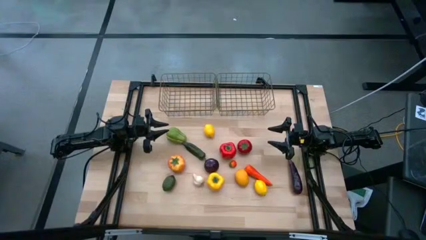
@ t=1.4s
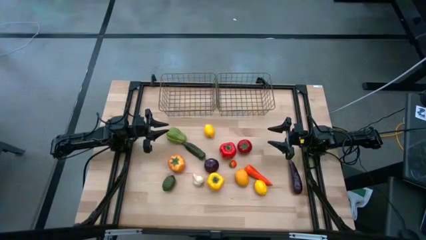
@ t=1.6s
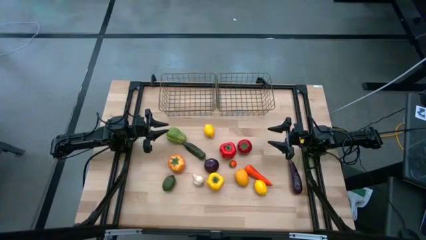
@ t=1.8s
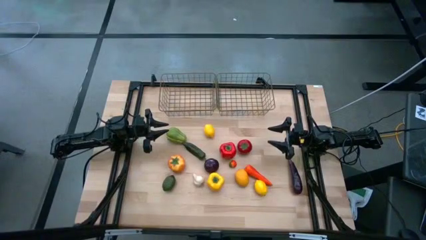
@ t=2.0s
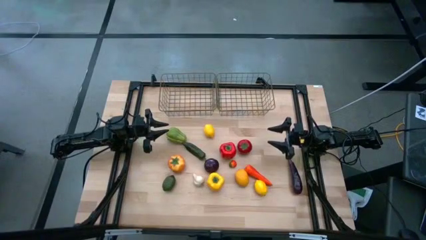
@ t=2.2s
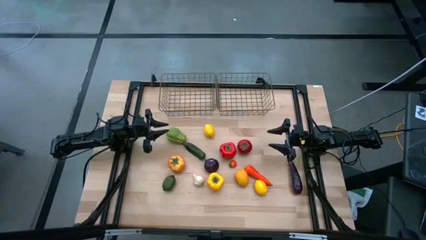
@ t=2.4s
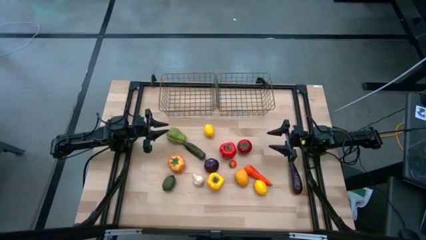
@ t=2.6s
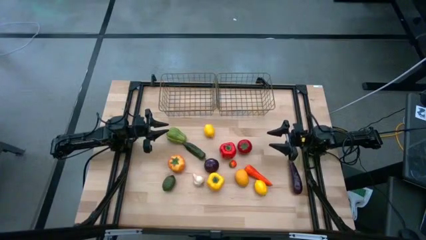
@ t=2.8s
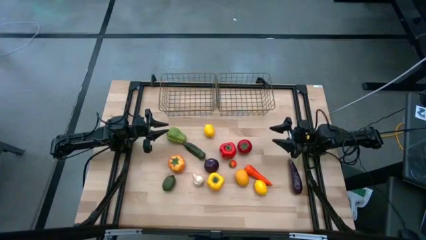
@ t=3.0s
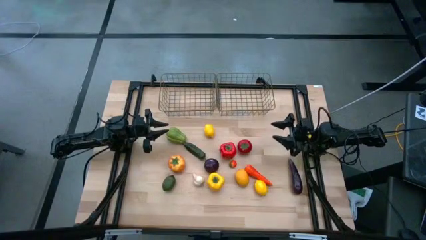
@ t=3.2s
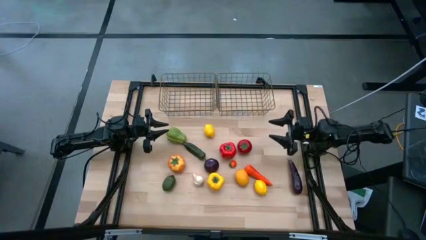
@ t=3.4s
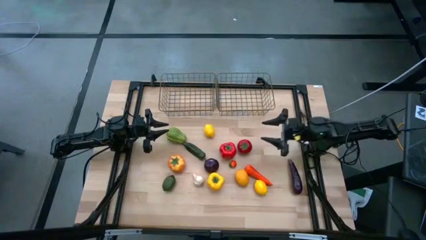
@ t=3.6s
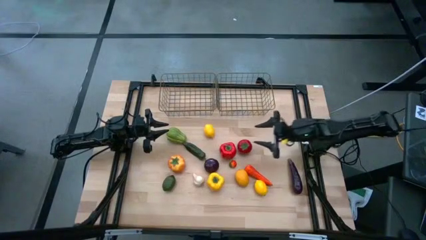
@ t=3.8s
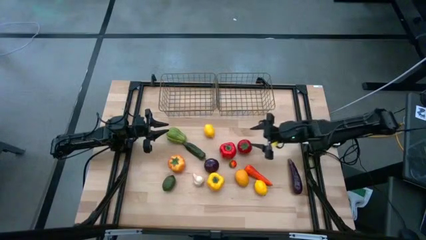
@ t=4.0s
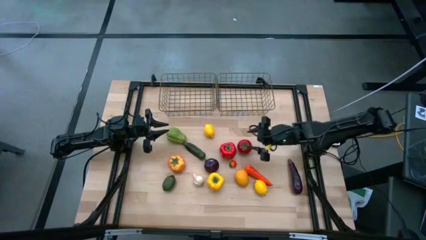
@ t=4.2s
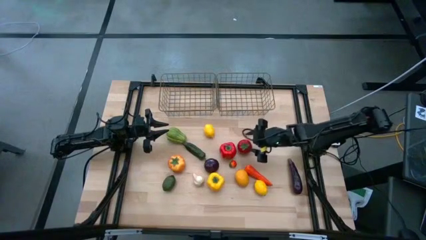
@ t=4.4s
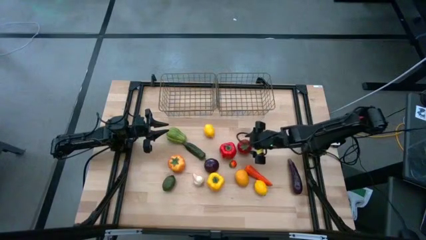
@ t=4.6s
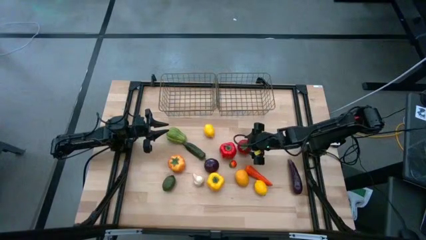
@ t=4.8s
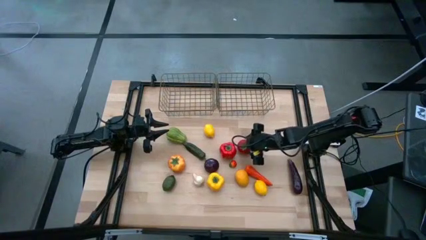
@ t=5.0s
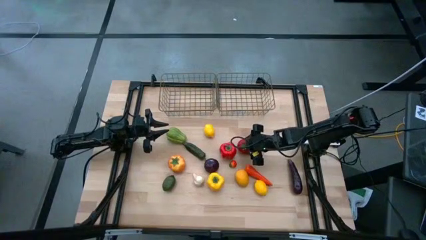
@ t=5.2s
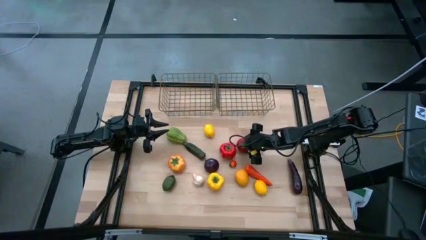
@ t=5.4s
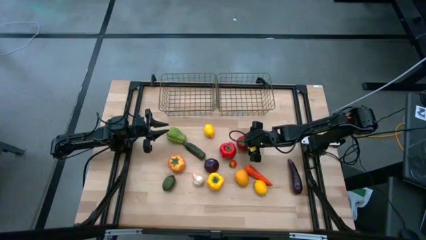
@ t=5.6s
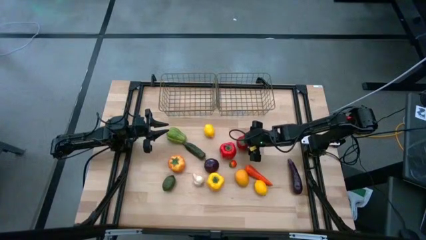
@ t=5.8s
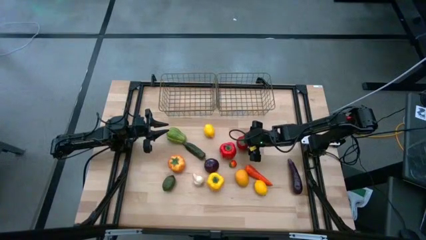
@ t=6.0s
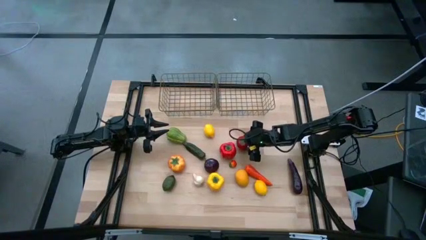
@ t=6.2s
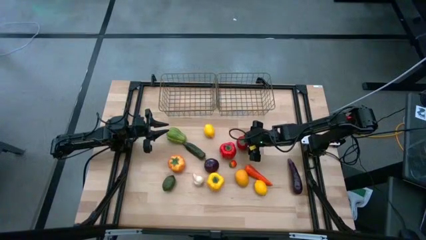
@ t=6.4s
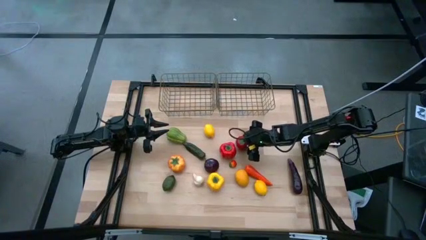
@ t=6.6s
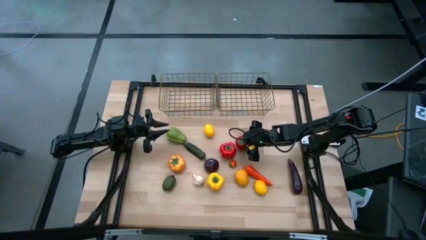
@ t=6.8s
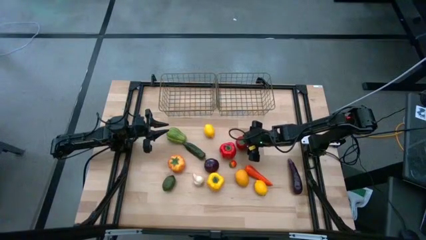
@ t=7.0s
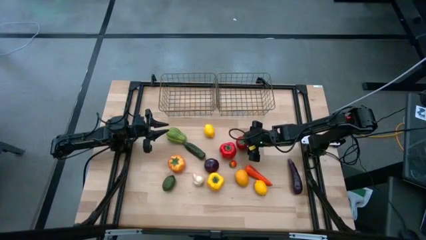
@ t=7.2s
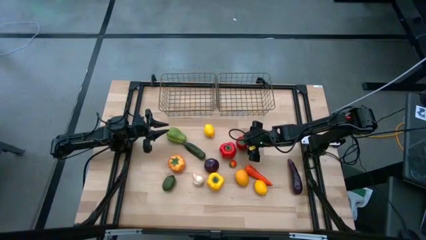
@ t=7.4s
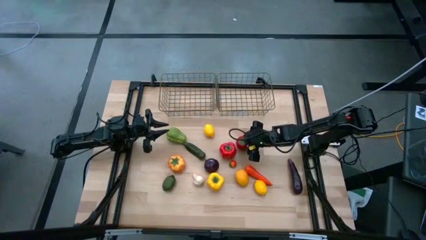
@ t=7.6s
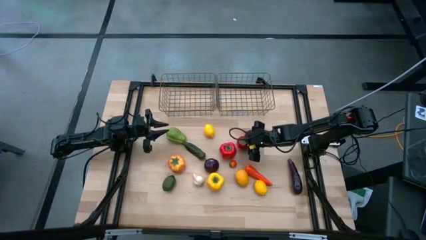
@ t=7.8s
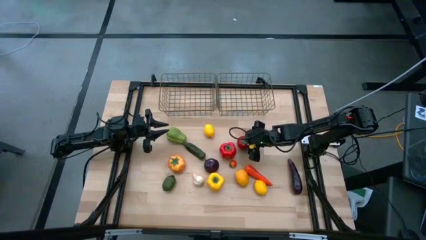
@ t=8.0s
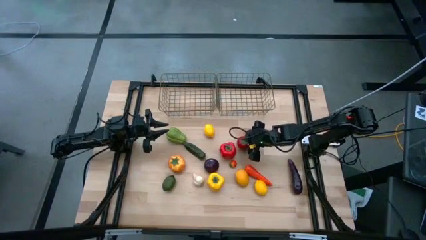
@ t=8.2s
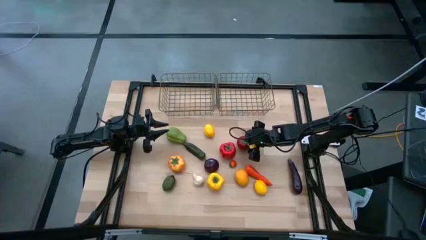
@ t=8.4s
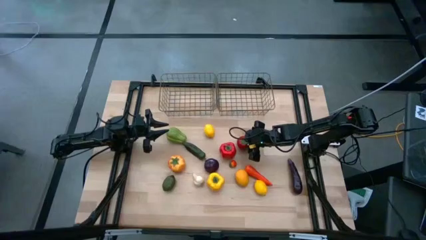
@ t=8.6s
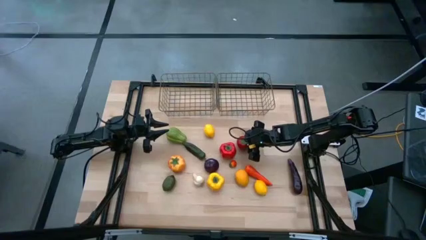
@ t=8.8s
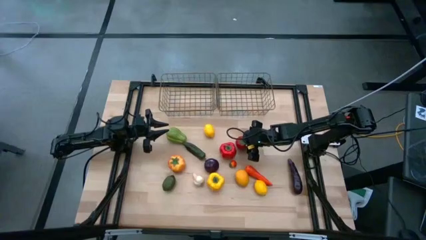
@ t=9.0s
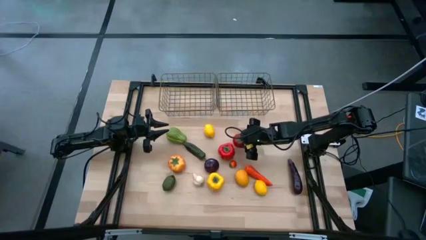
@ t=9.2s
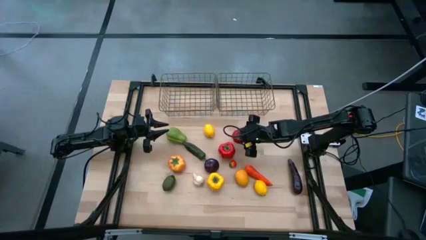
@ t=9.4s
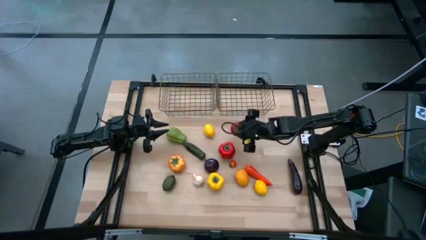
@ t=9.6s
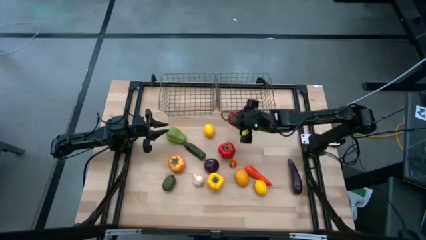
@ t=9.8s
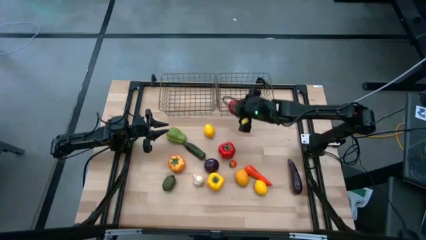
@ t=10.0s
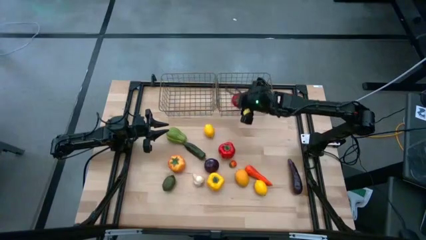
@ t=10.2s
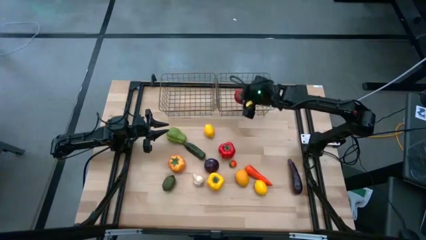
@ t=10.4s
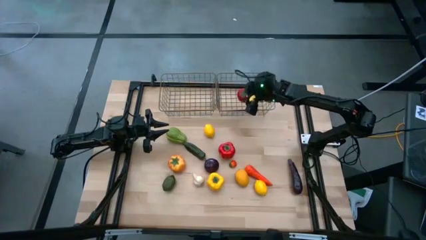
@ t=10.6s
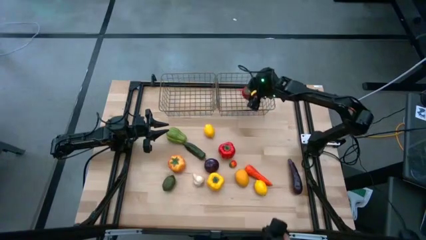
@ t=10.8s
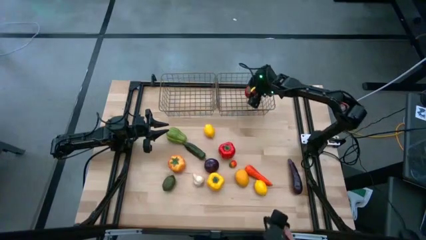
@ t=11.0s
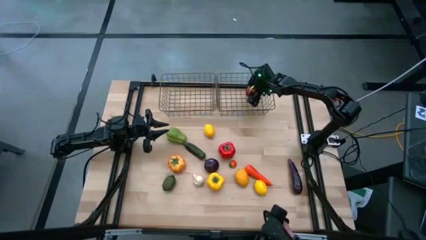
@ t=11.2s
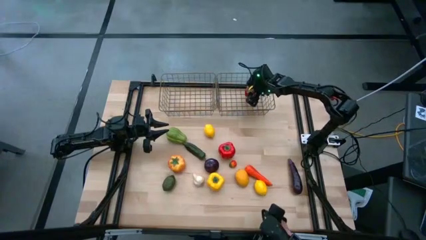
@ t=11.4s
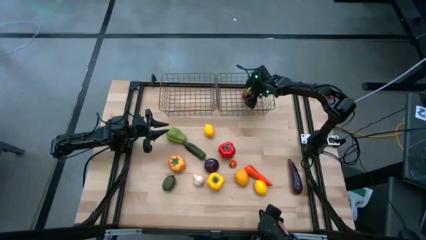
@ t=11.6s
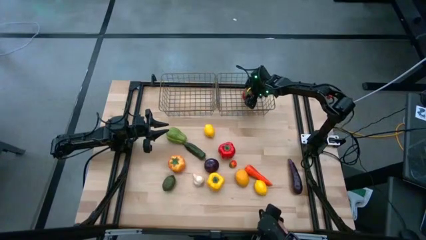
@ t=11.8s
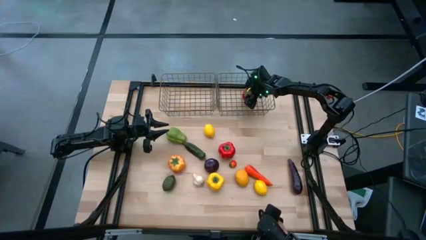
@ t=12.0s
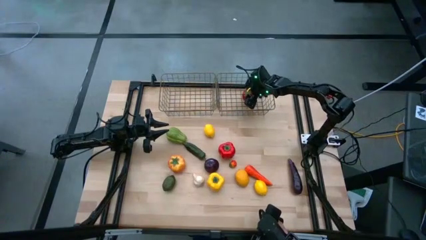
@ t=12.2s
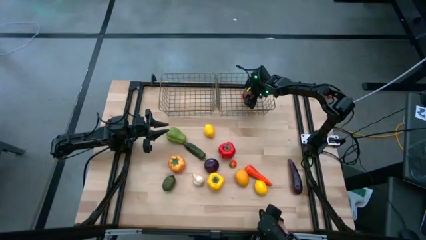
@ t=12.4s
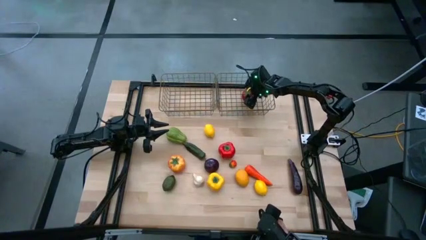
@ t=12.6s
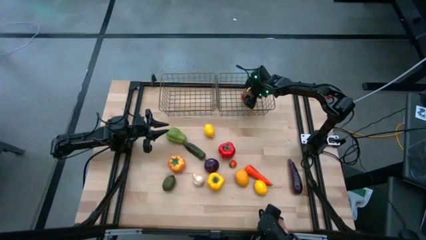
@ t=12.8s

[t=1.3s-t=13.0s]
Task: Sort produce into baskets
Put the big red tomato into the right golden wire basket
